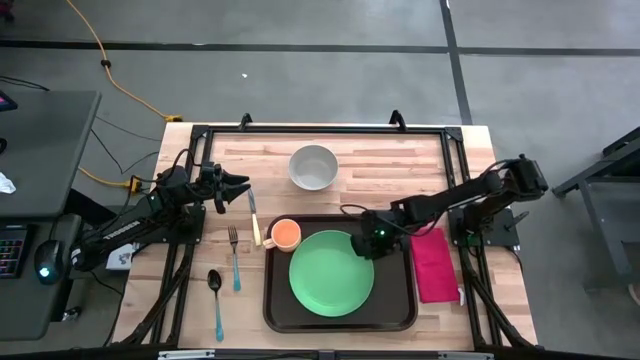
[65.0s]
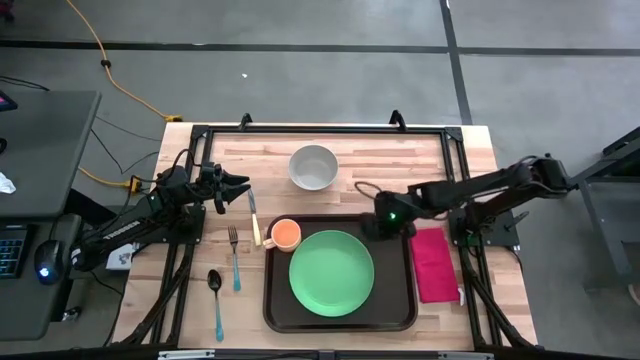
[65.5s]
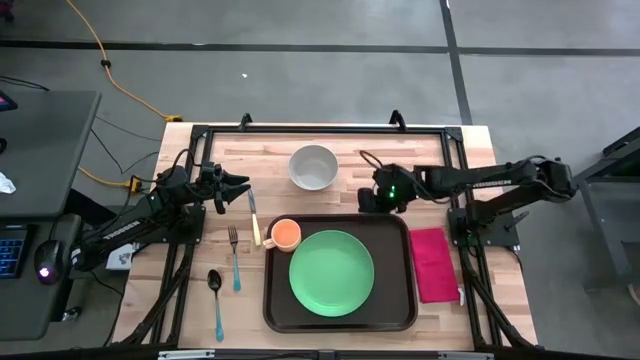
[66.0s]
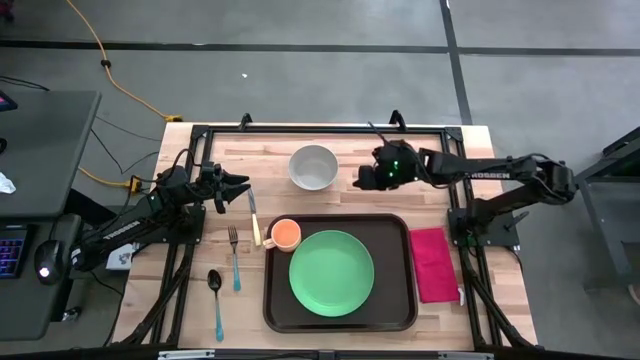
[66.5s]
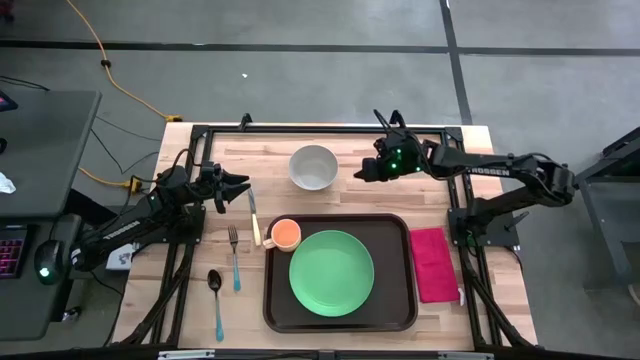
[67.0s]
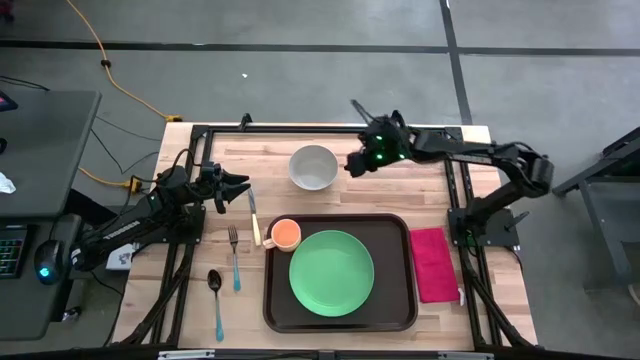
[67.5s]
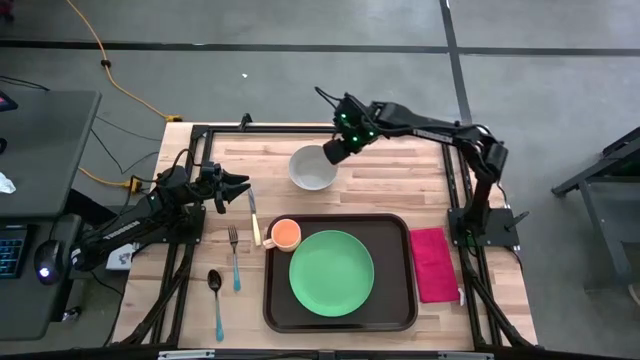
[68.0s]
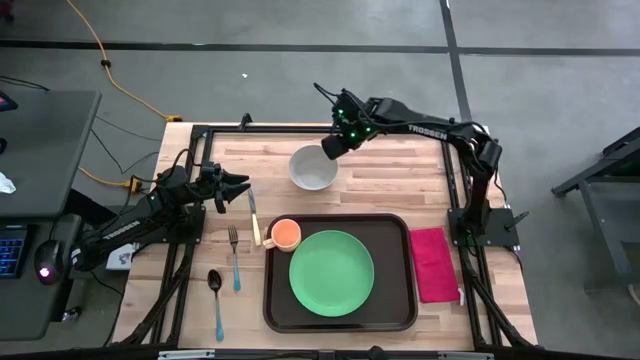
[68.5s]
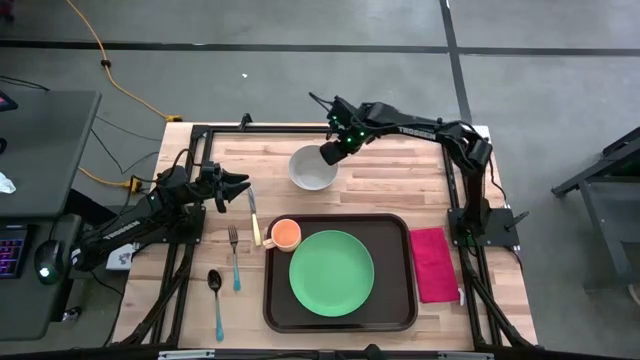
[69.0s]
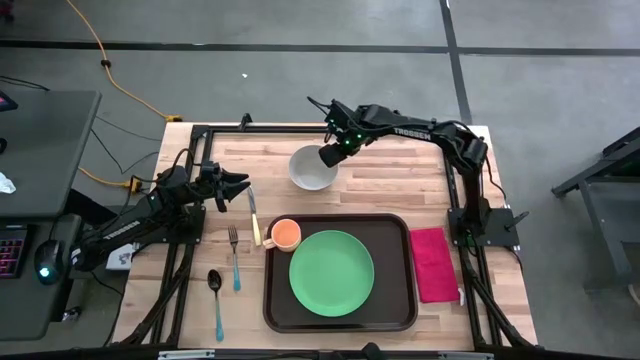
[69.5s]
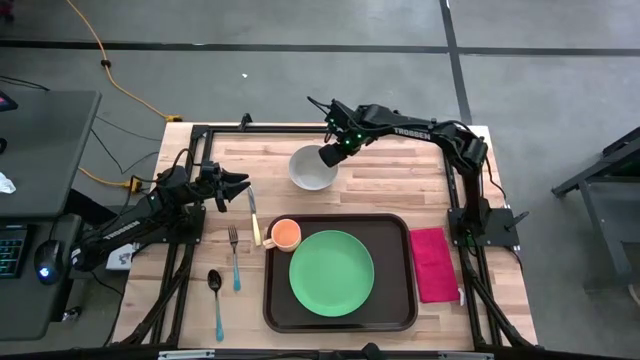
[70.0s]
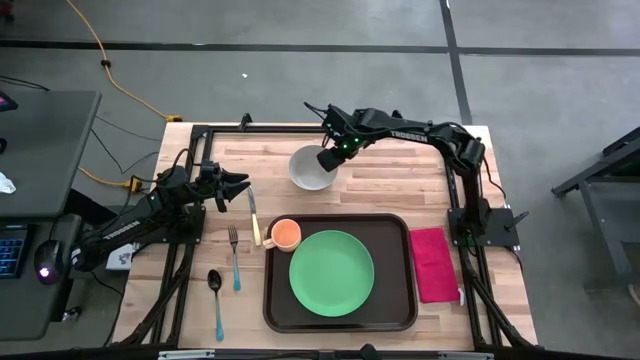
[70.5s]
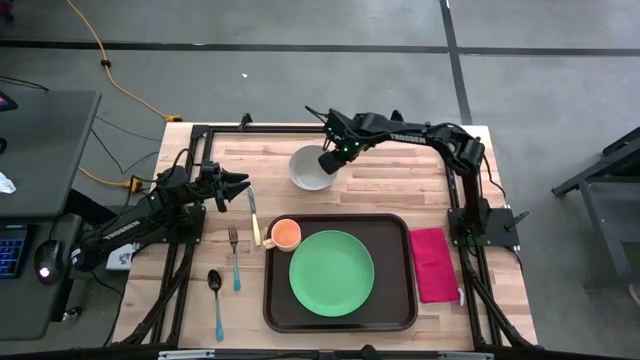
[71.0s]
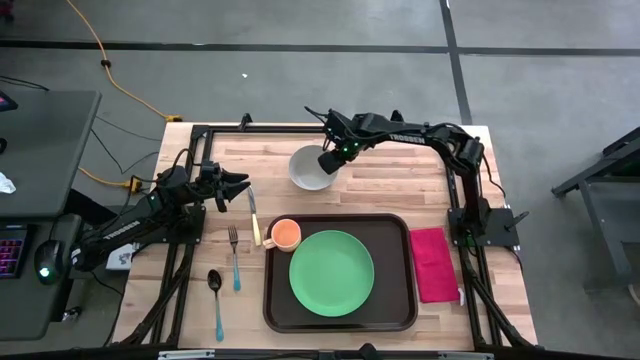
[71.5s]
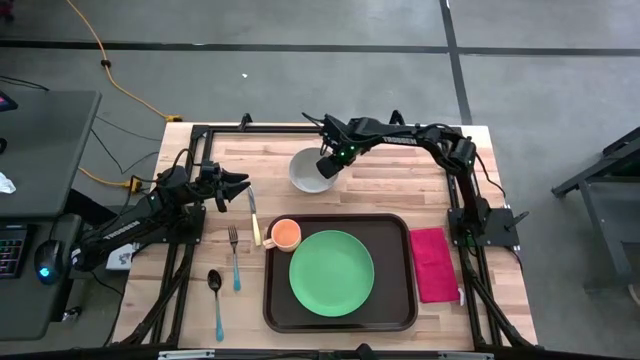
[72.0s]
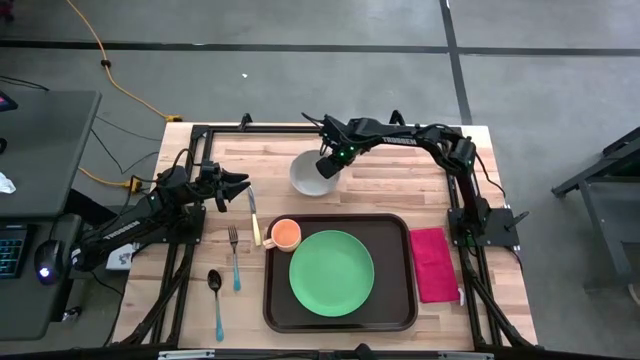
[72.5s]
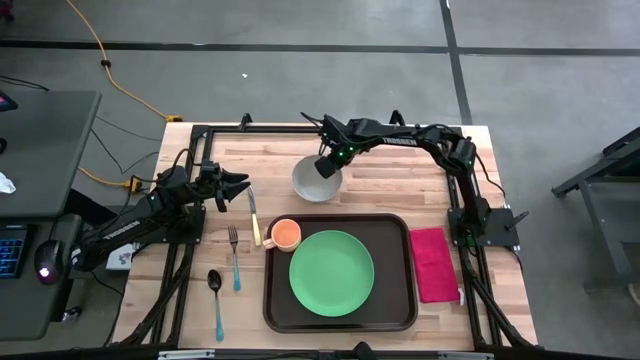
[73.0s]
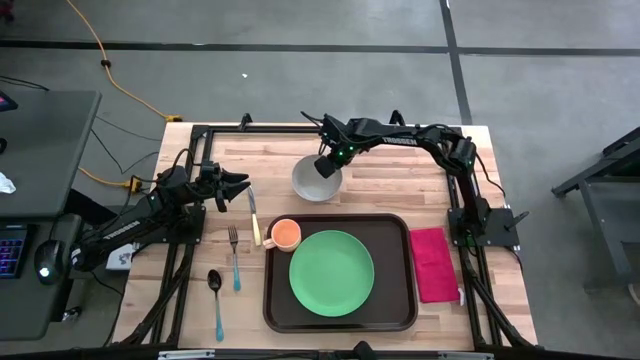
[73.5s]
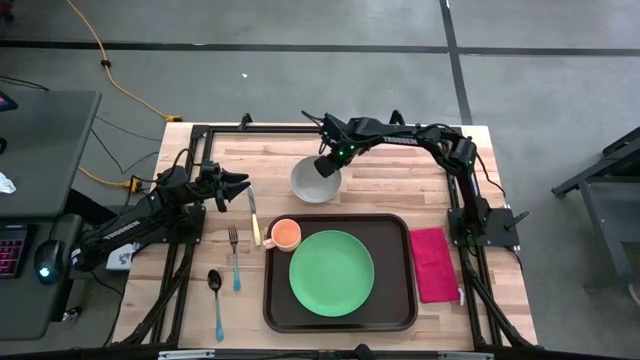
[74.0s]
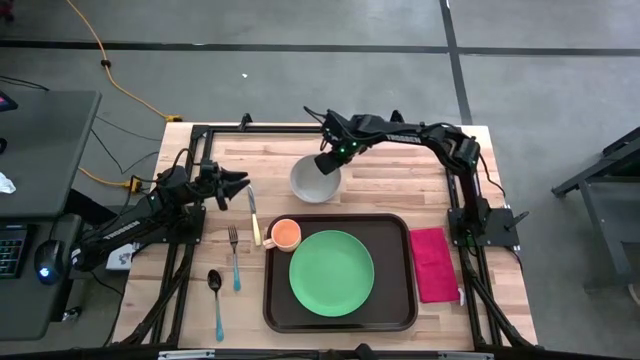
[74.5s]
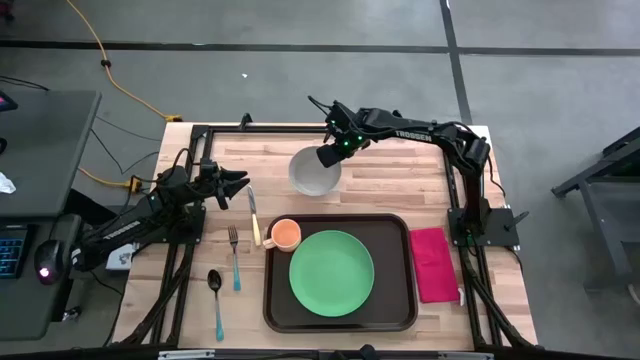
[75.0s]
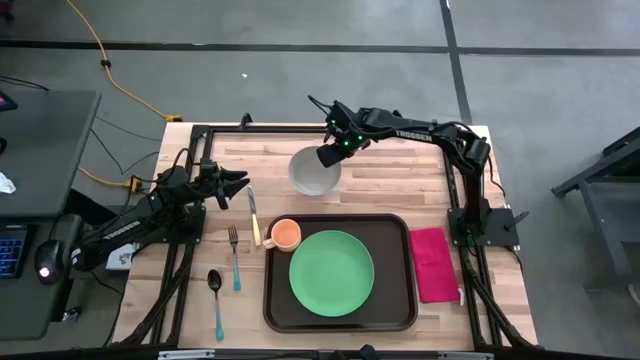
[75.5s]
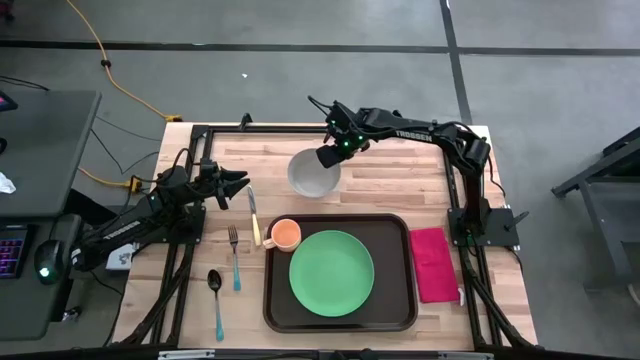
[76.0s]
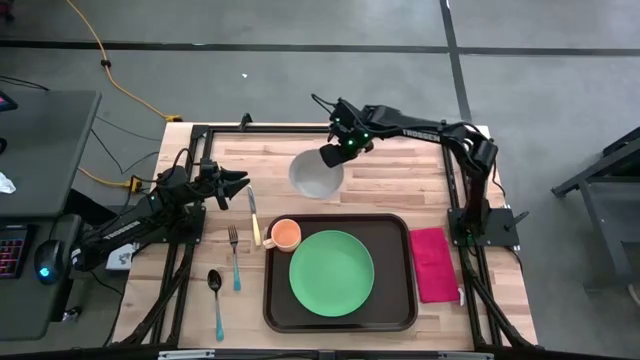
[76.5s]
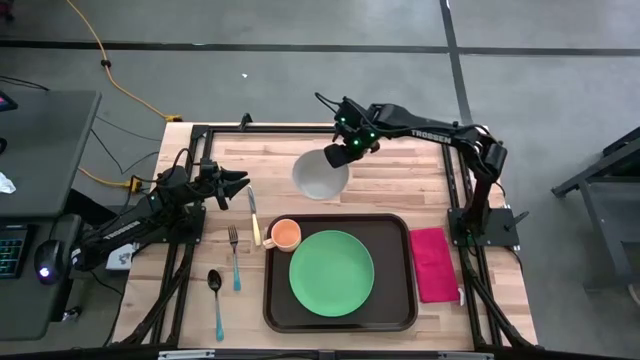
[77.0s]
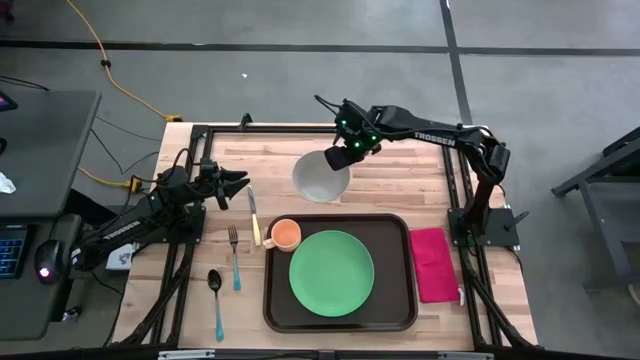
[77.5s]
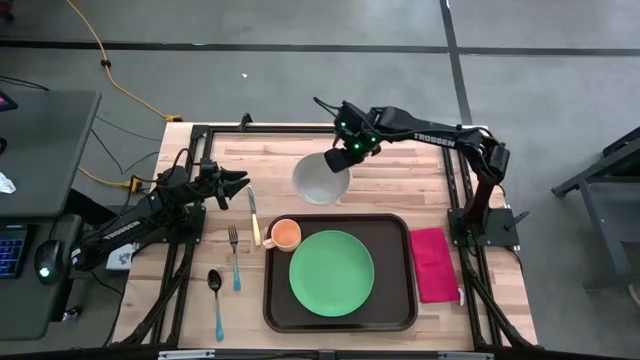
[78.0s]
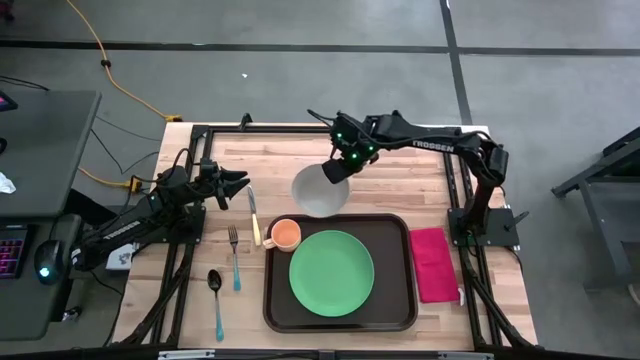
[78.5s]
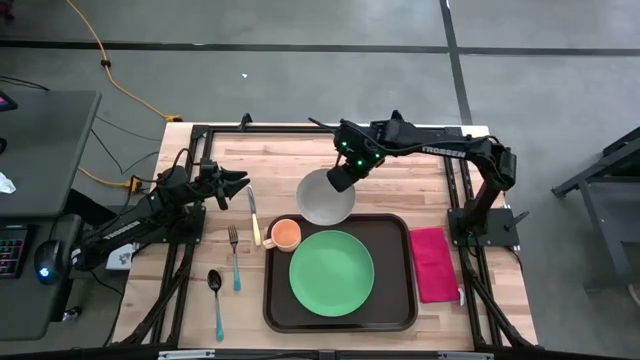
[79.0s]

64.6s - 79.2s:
Task: Set up tray
Put the white bowl on top of the green plate on the black tray

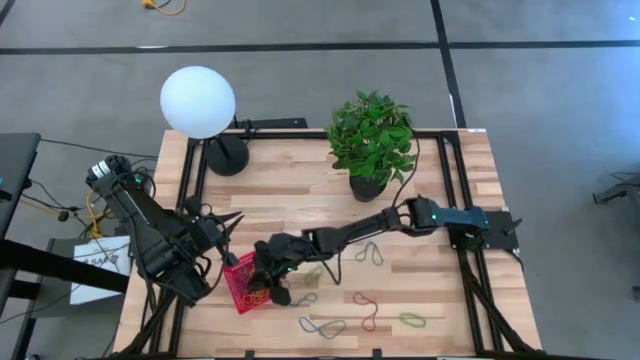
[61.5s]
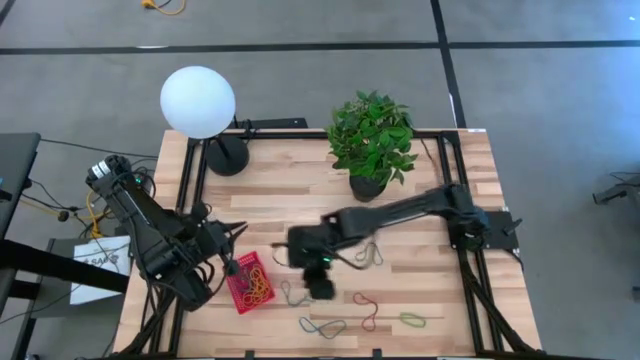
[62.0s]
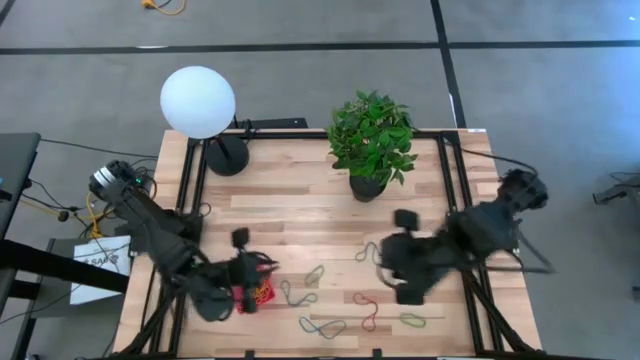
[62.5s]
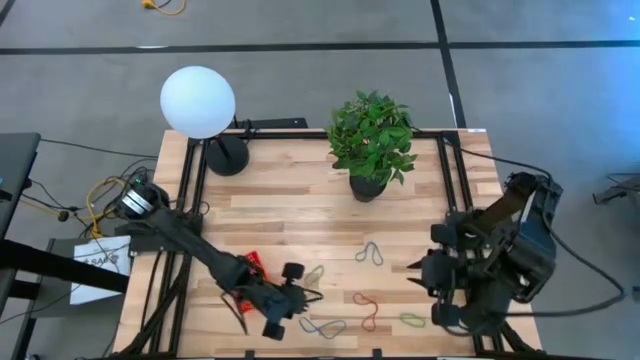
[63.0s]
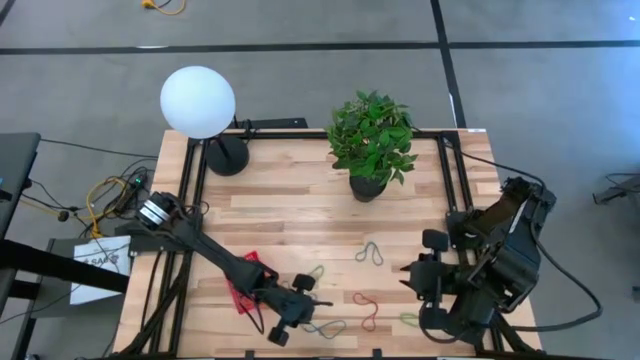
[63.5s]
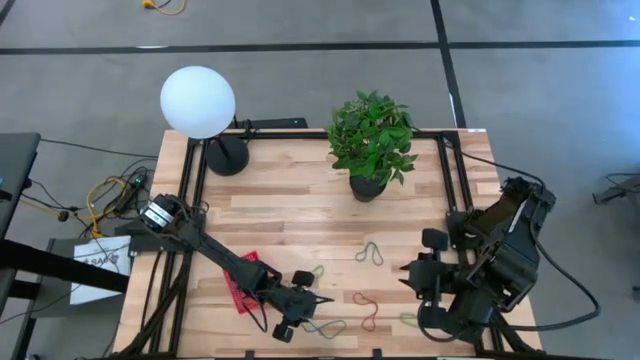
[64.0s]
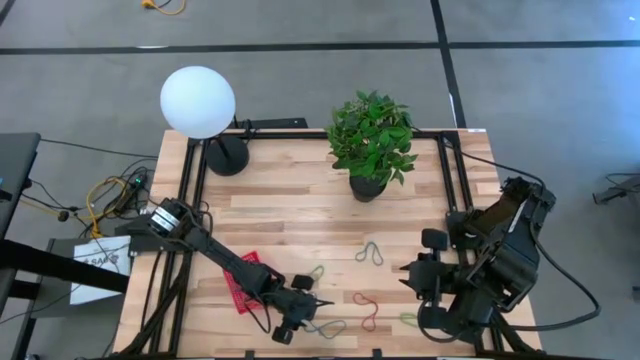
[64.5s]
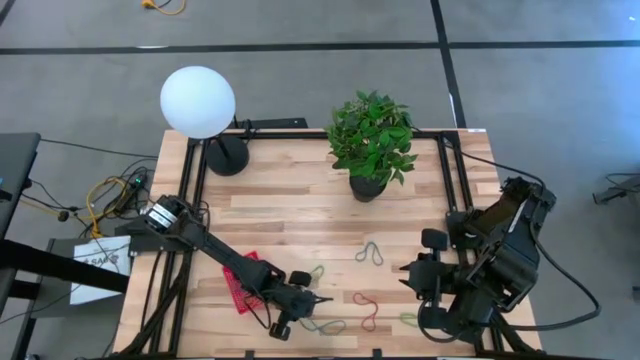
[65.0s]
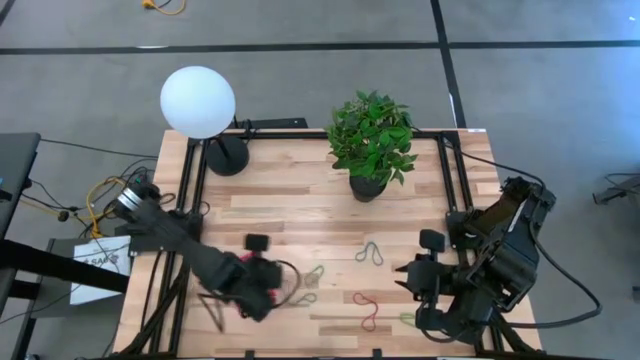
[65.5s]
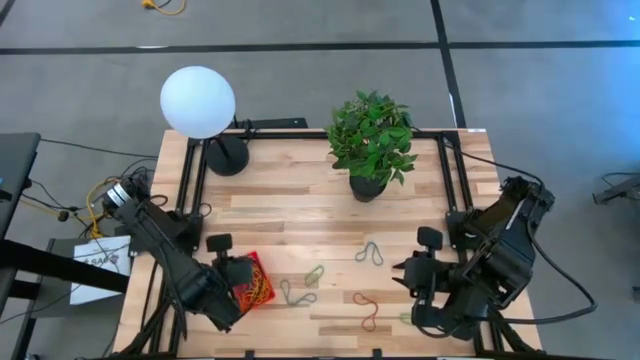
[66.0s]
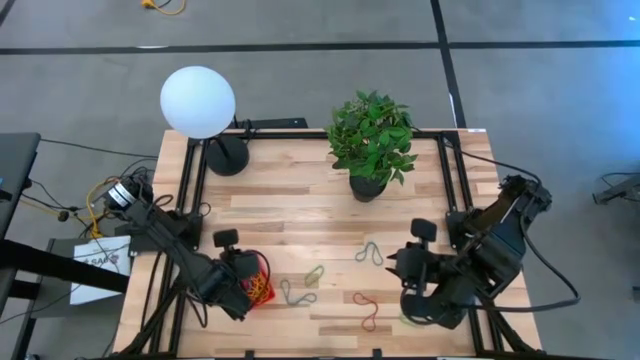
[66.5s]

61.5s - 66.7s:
Task: Pick and place items into bin
Put the blue rubber band into the red bin

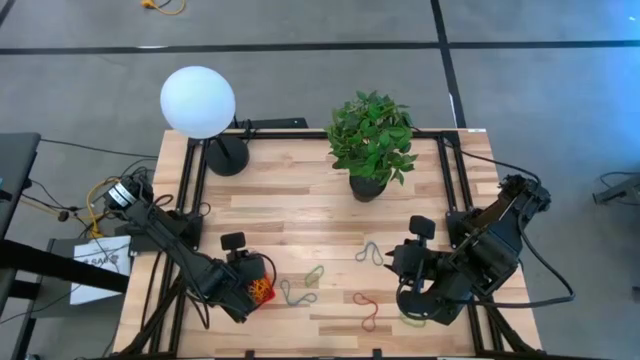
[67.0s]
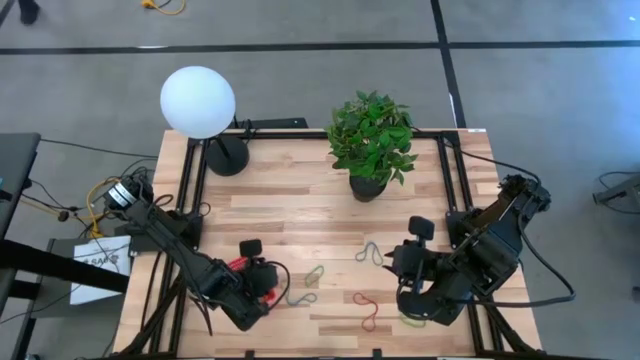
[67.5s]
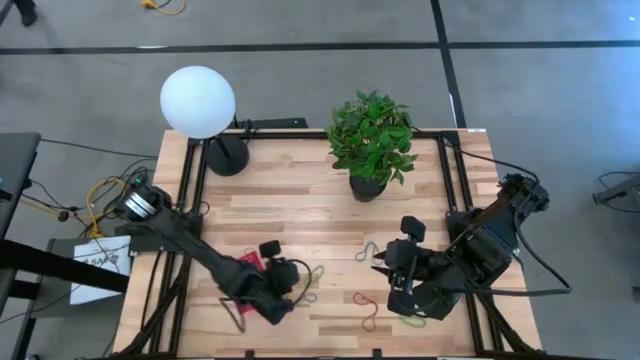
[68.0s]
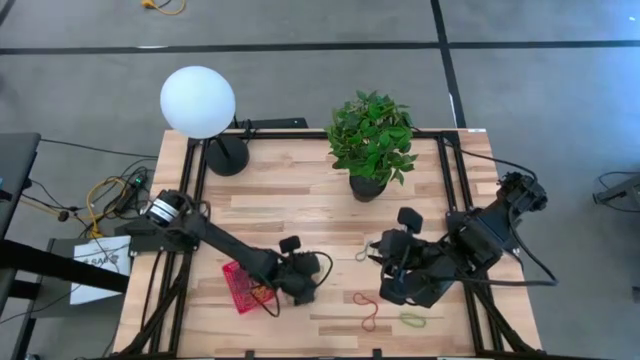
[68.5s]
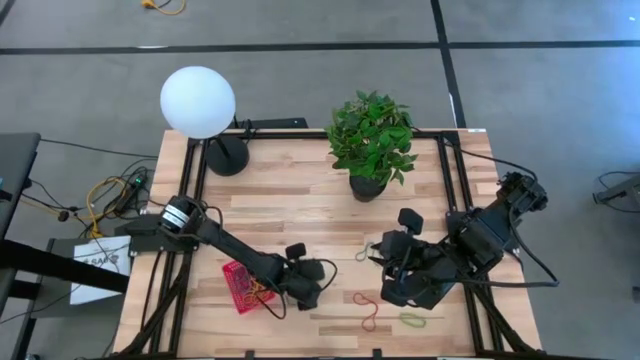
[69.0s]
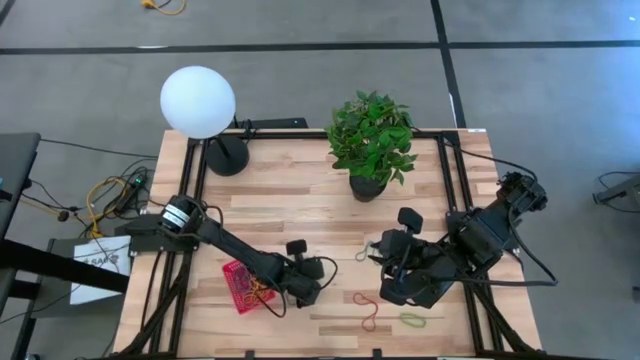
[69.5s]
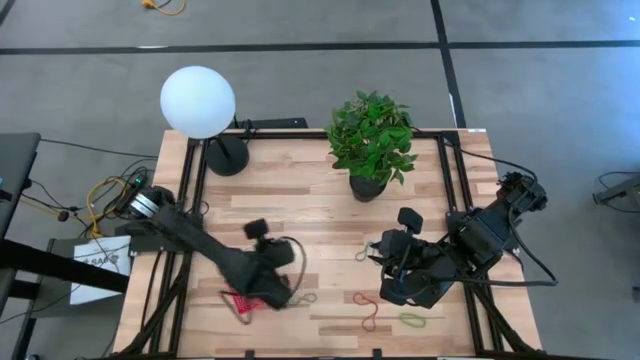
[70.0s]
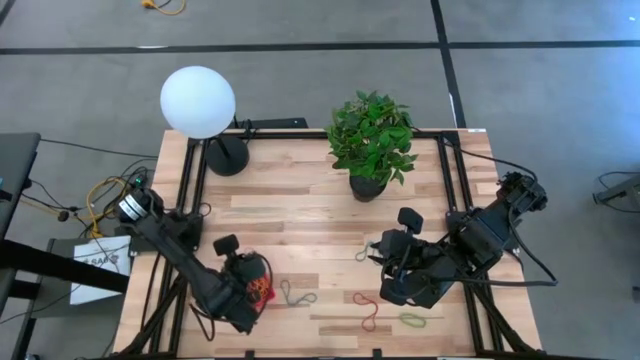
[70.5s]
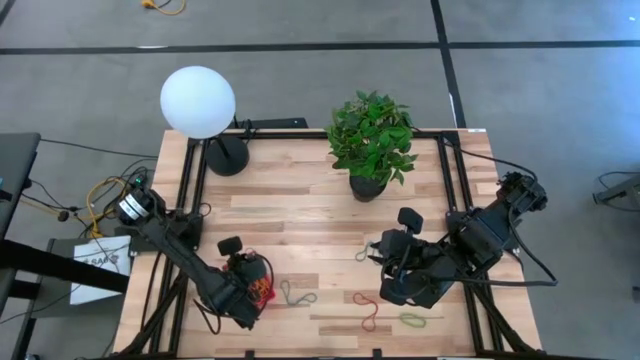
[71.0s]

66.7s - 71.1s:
Put the green rubber band into the red bin
